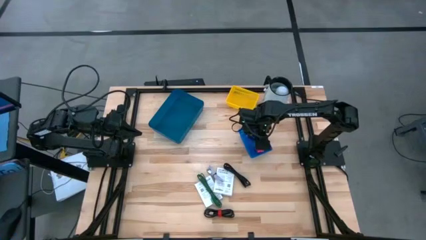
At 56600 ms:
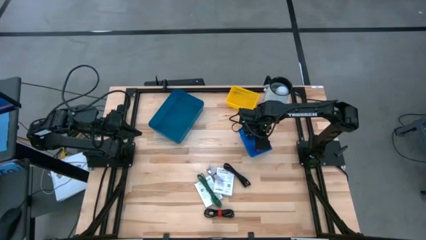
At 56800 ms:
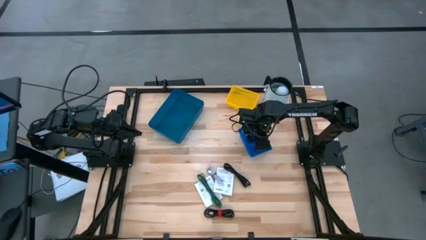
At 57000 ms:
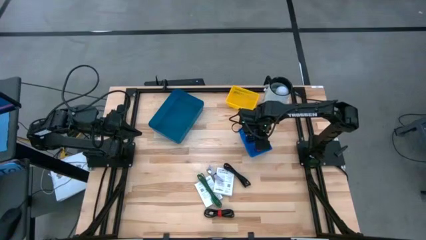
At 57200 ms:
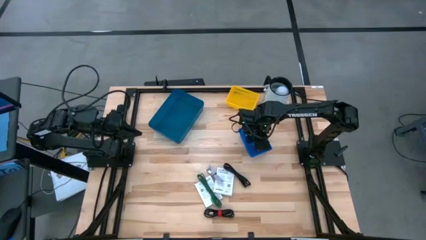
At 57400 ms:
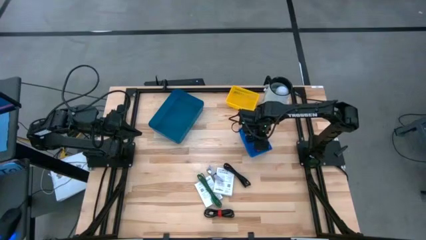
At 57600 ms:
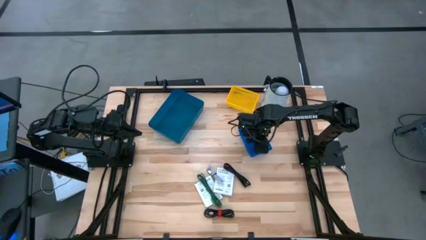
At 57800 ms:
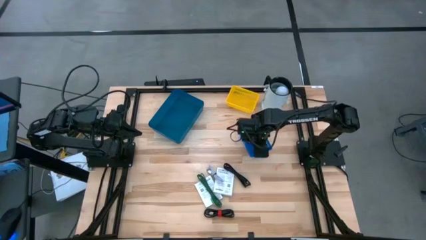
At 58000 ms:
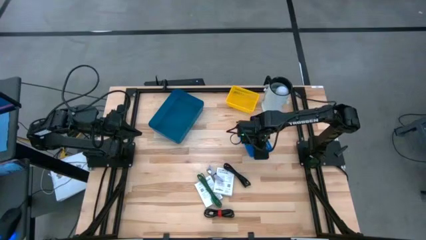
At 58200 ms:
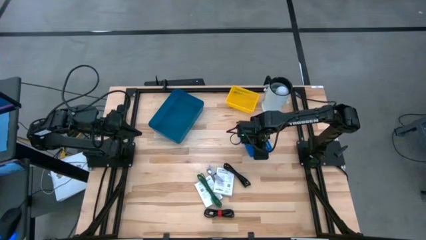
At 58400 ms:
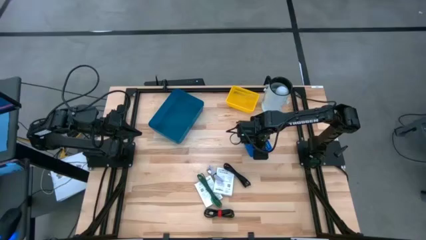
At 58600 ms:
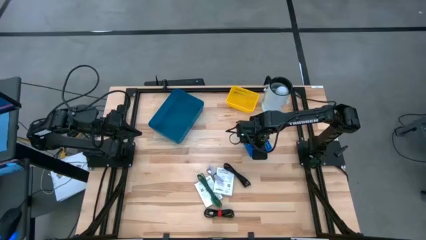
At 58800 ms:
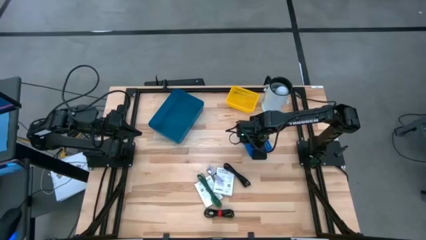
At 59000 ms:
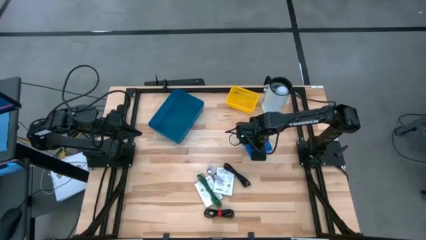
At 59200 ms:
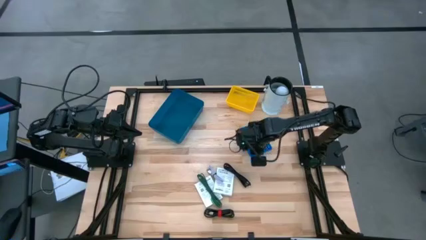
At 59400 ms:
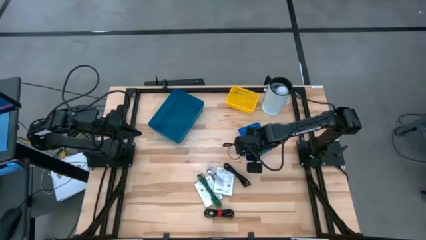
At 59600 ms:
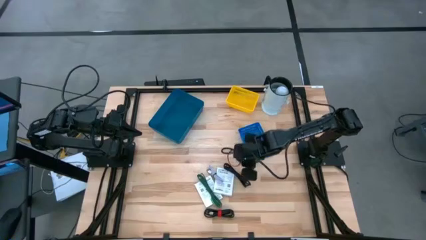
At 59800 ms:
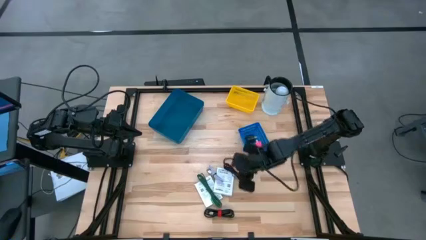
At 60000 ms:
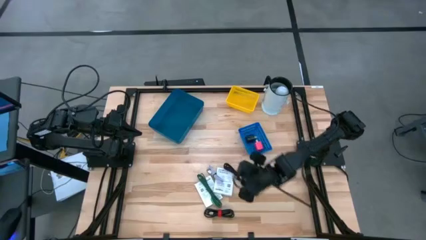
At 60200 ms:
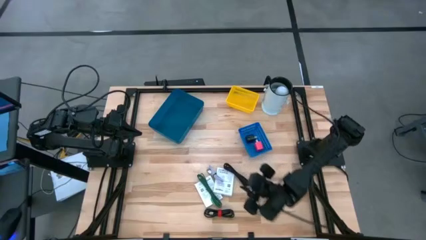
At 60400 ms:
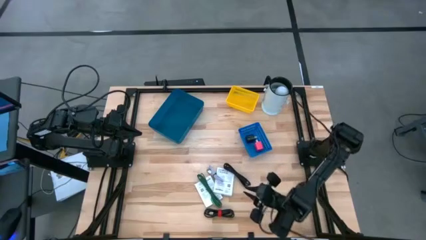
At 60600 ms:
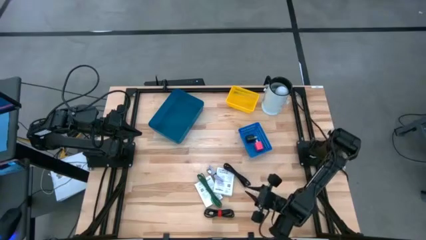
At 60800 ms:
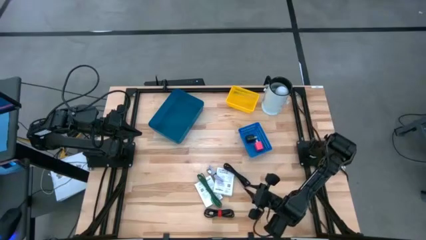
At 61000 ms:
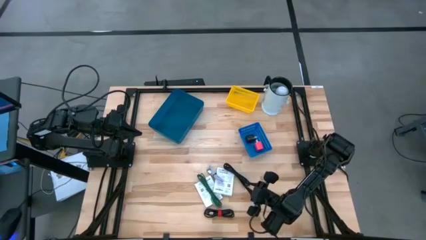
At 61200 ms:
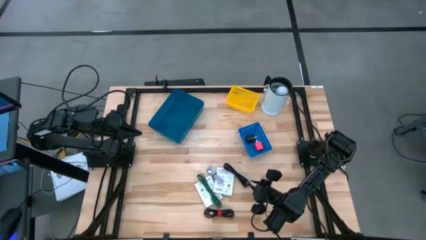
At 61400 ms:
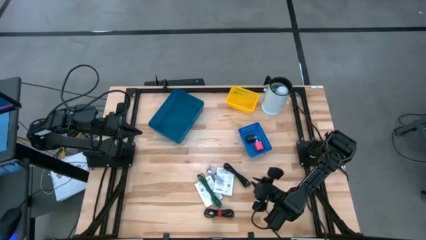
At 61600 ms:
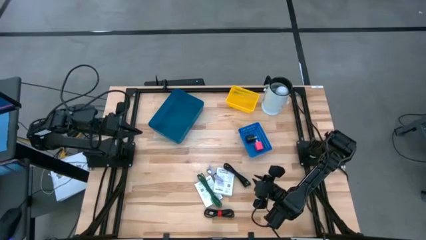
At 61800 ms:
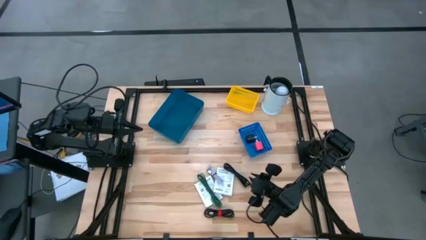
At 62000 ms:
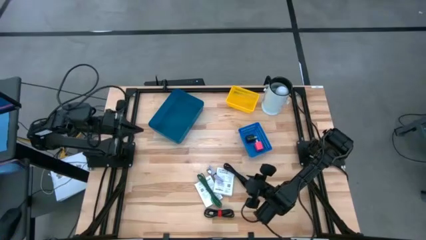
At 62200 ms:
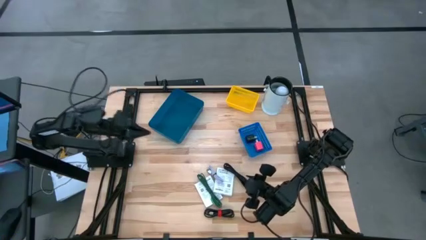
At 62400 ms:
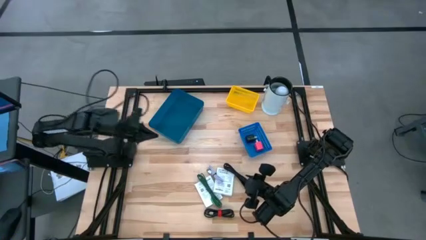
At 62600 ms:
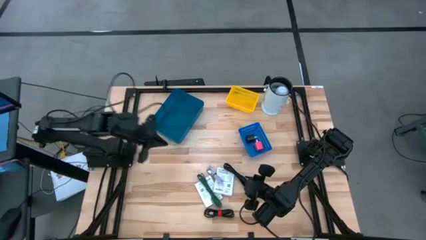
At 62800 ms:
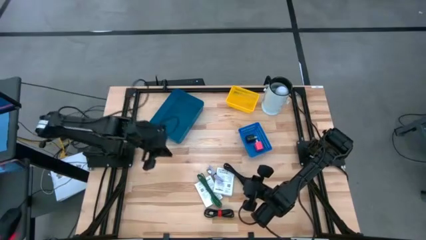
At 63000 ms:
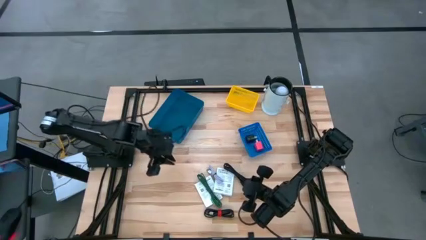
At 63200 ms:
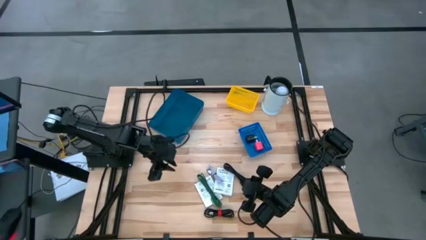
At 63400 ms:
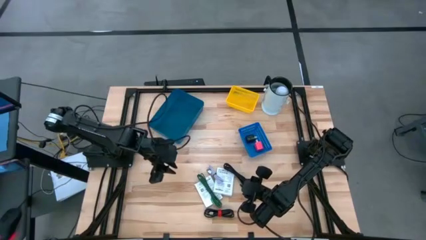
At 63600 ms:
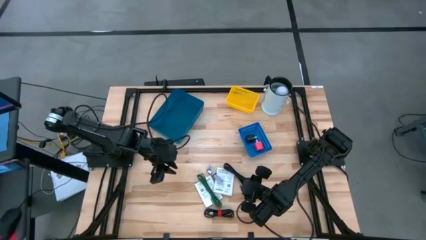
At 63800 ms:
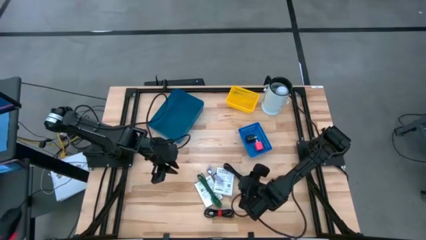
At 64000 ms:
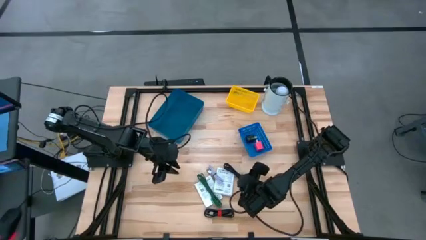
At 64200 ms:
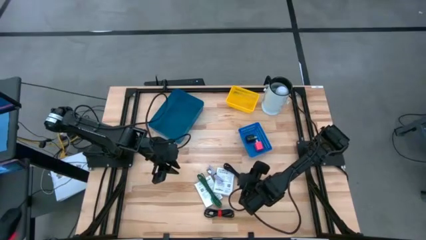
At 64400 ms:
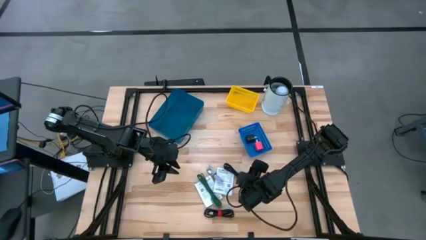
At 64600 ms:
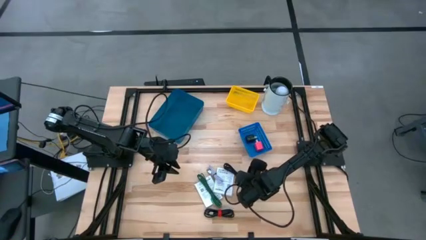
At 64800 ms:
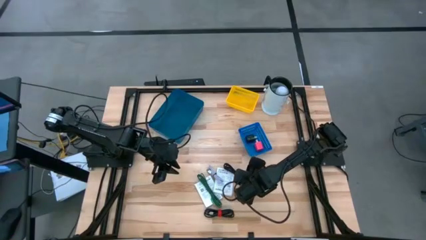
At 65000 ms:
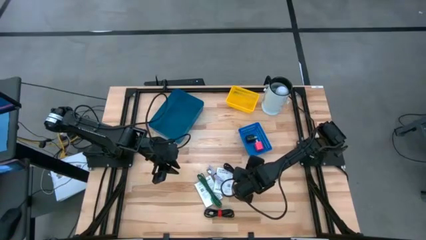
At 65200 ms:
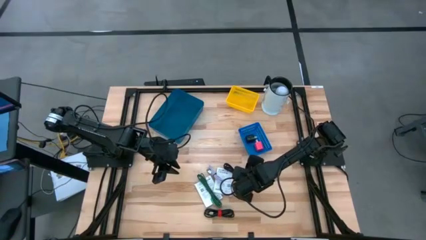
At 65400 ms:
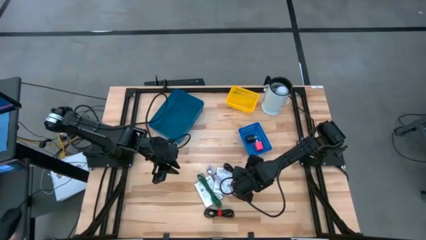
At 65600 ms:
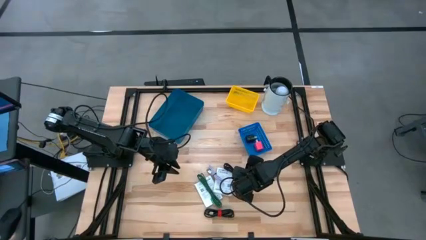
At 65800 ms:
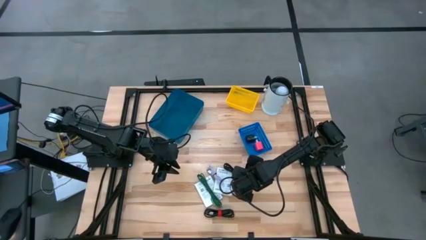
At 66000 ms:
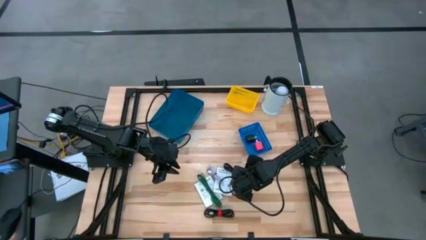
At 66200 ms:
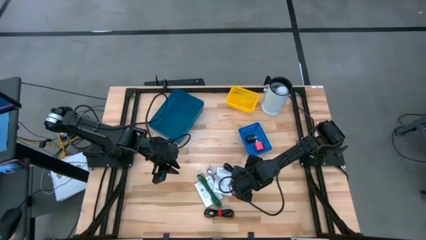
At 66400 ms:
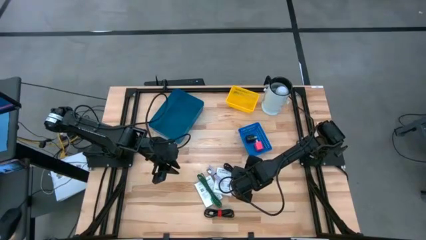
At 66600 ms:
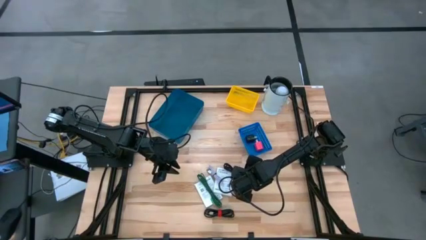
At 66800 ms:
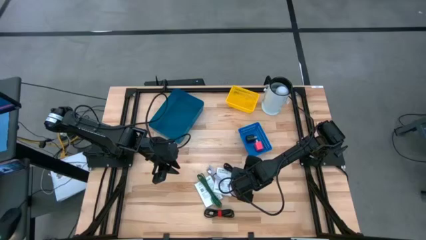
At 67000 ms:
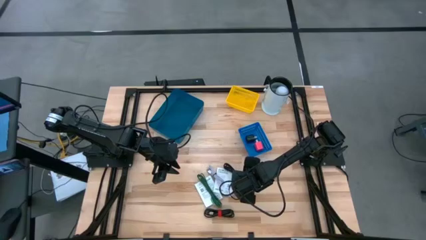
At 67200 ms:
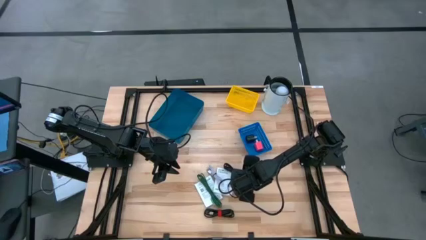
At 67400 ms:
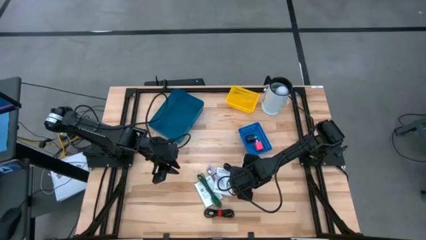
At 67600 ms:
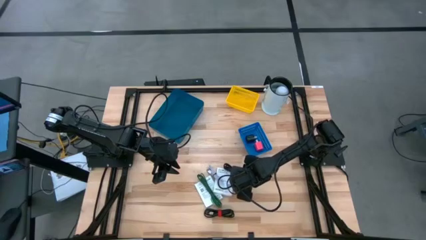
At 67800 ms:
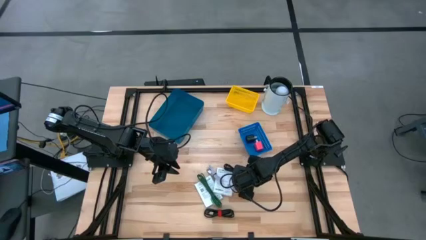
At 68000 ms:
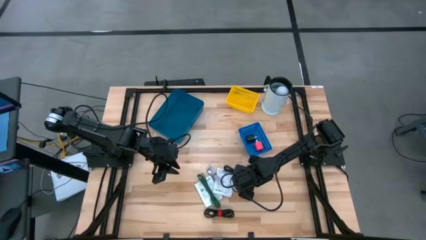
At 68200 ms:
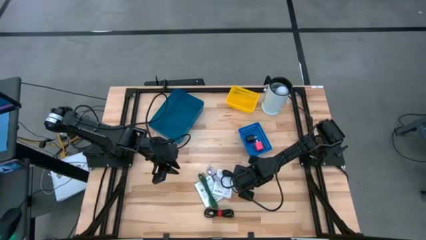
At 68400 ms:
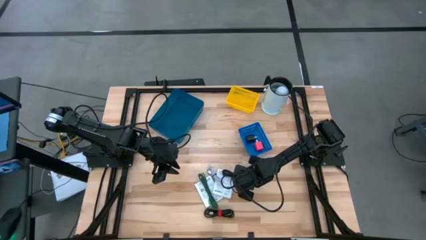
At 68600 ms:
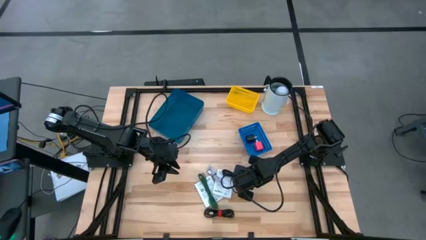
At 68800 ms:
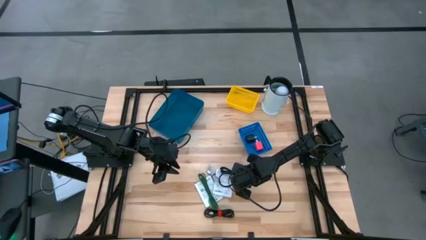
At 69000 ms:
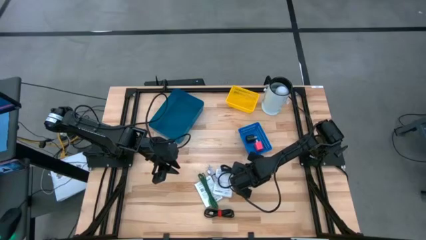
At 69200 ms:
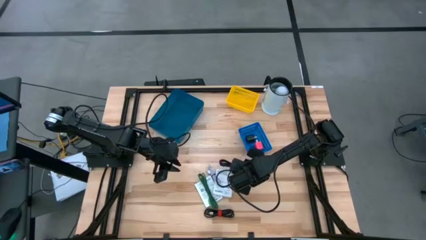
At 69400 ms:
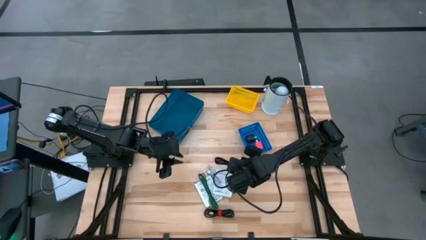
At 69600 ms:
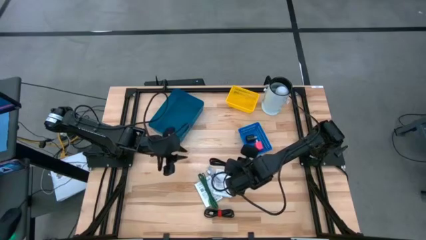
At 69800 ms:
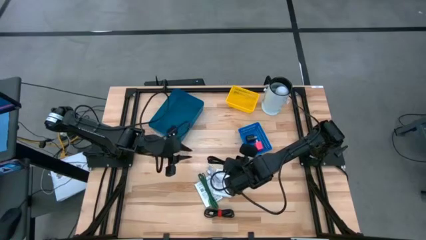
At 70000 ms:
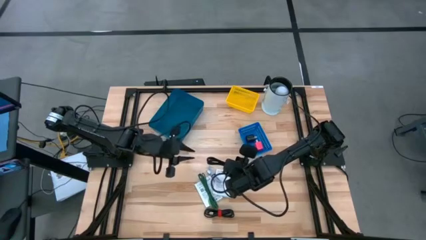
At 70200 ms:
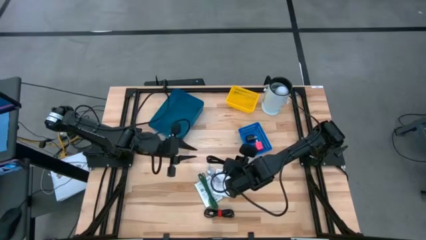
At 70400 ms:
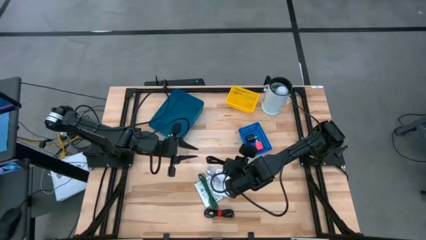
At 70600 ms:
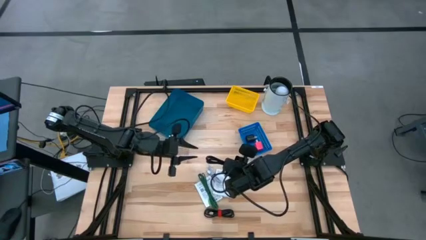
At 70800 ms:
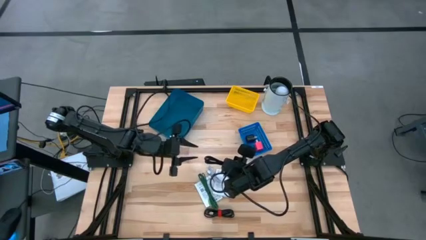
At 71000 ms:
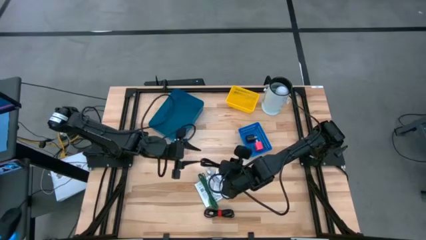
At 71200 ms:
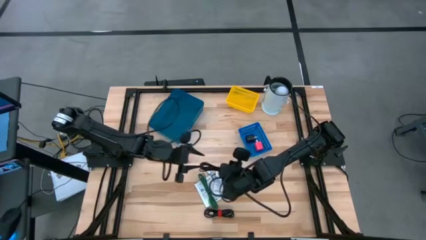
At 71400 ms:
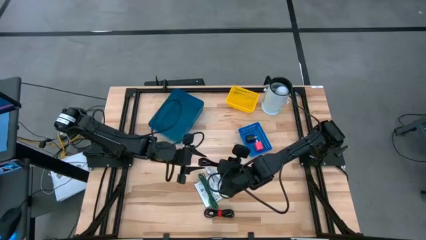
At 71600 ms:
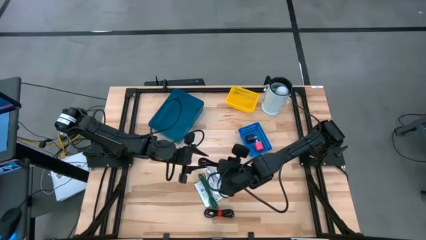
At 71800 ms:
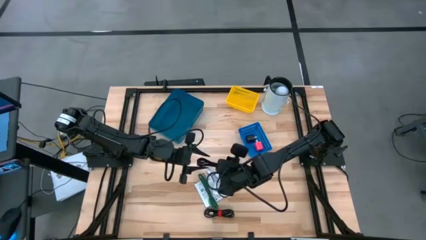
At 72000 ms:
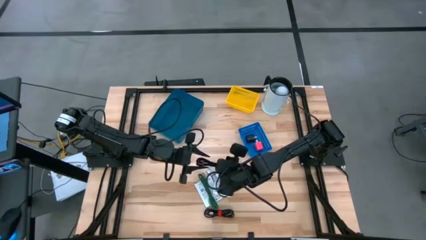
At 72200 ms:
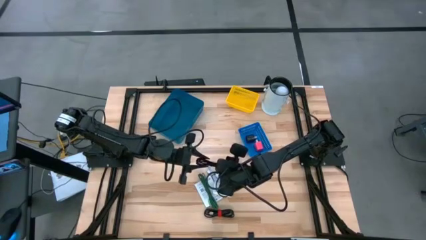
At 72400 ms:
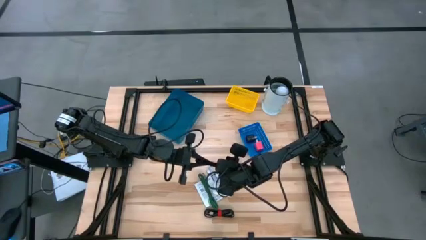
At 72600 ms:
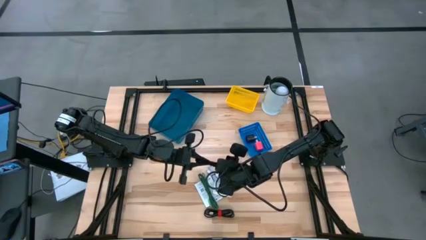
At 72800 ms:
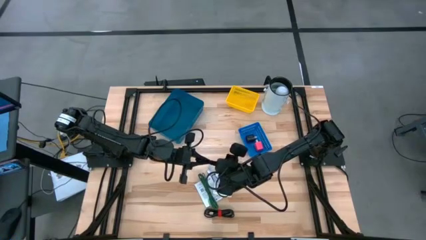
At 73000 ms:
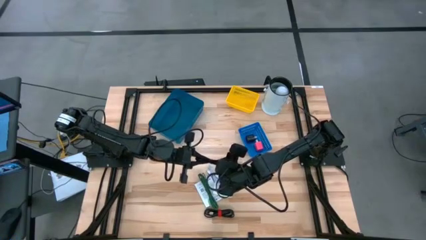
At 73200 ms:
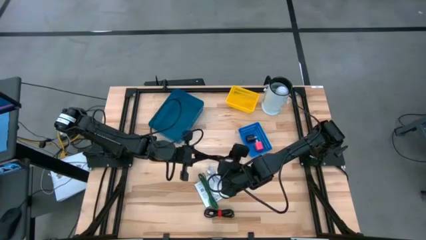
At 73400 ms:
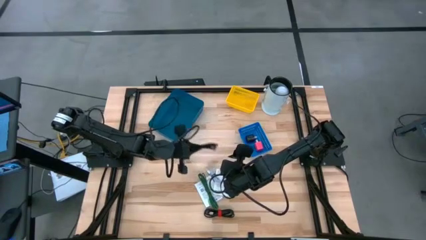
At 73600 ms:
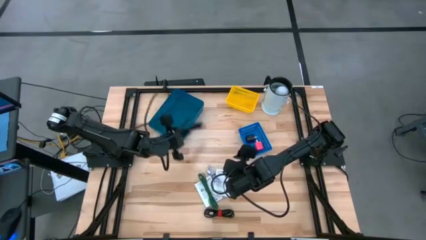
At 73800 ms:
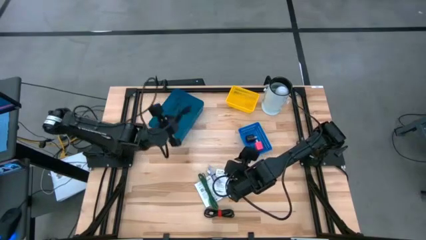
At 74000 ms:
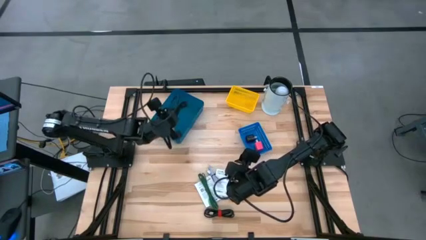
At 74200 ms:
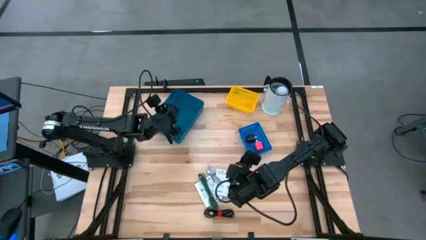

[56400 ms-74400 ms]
Task: Pick and place items into bin
Put the top black charger cable into the dark blue bin
